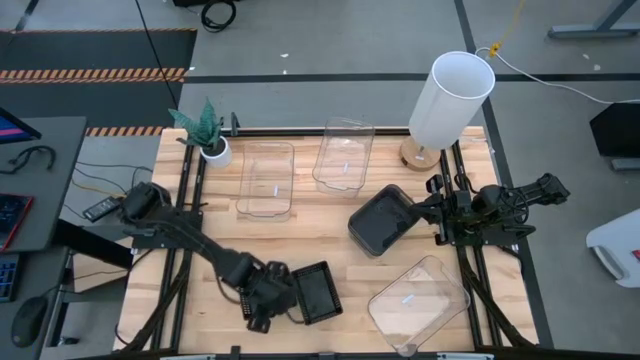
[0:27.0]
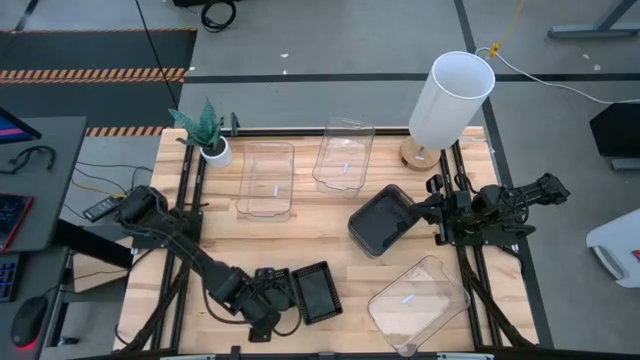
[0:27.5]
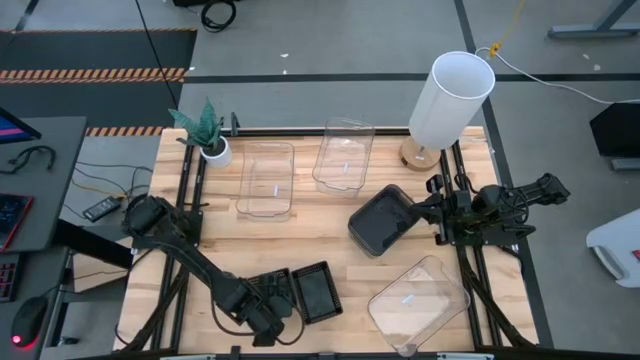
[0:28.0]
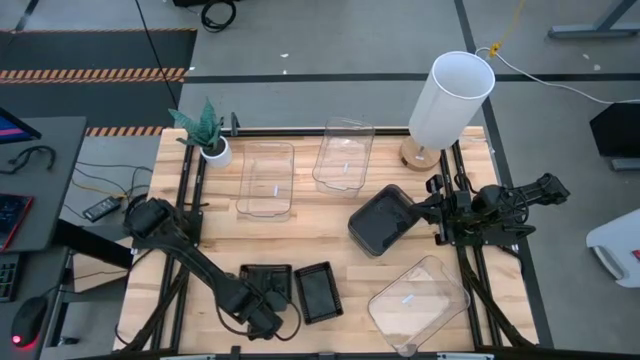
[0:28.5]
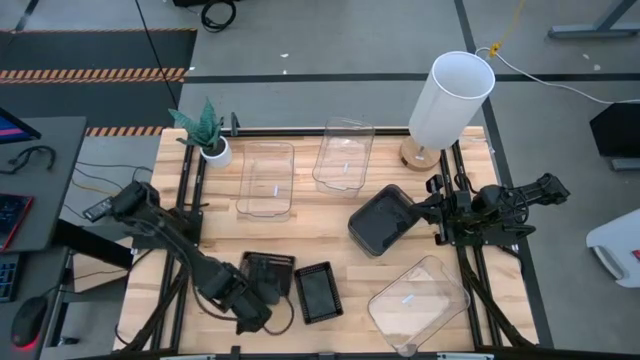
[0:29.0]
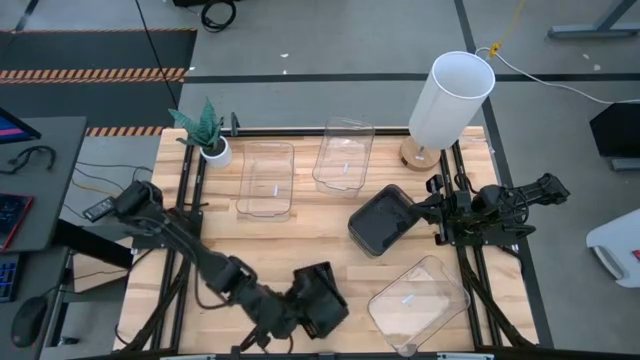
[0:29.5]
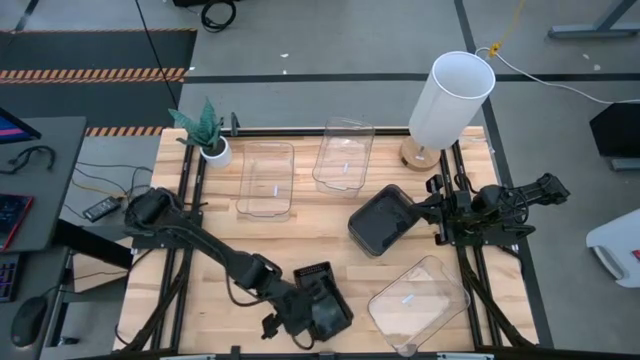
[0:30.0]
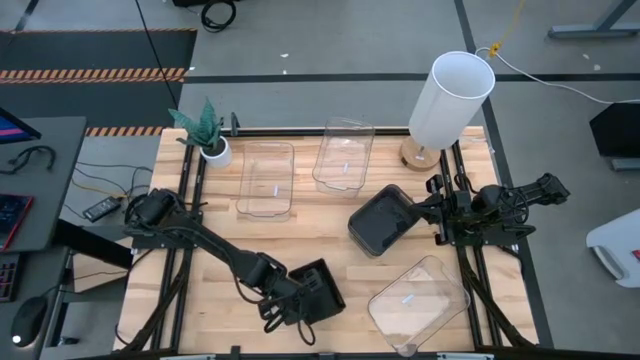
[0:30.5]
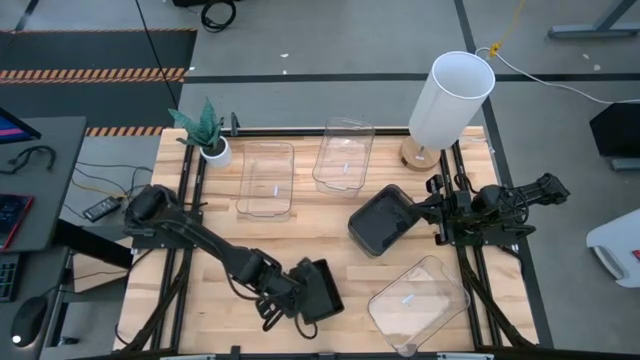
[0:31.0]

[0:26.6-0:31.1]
Stack the left black basket on the top of the right black basket

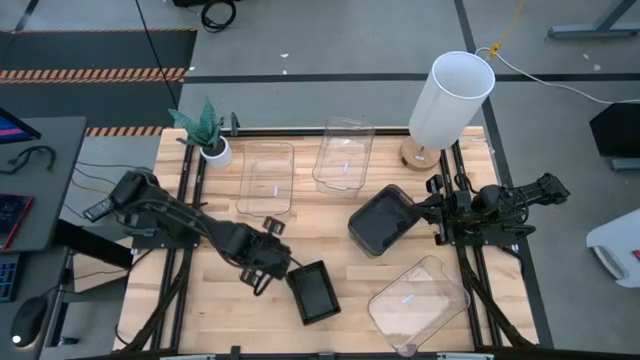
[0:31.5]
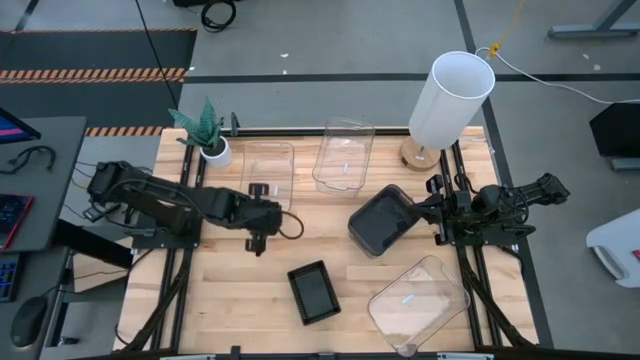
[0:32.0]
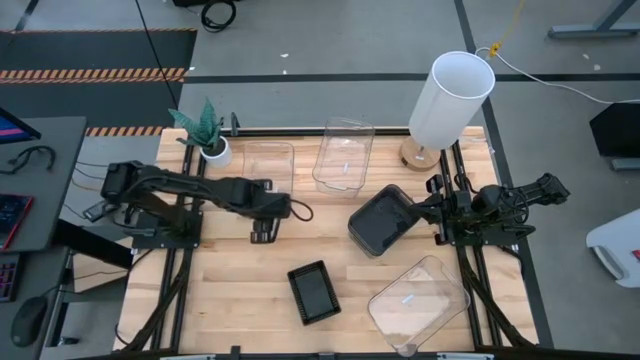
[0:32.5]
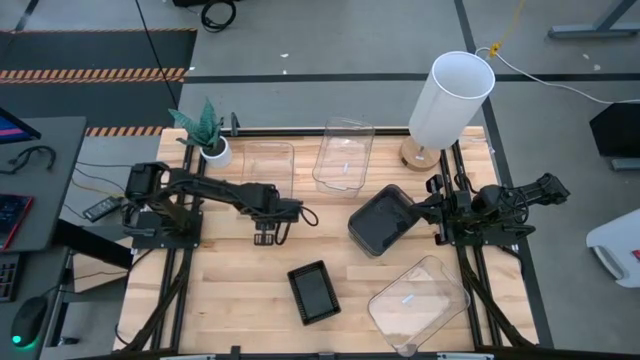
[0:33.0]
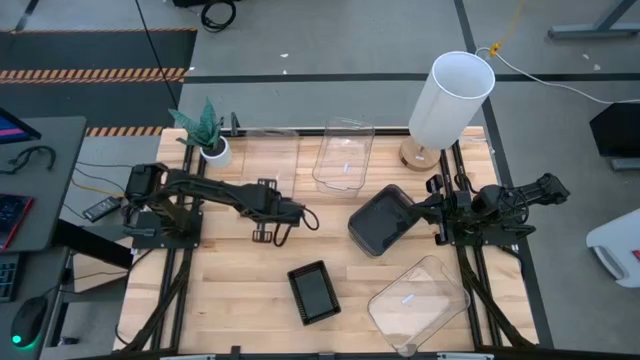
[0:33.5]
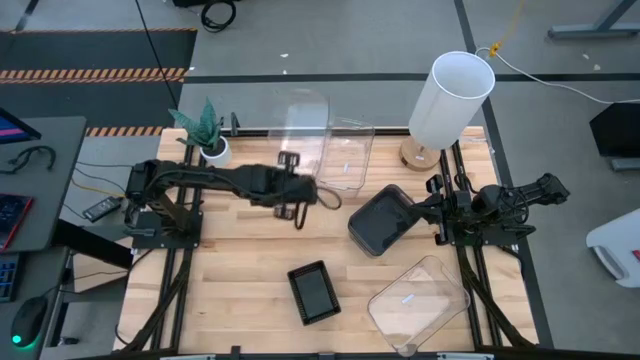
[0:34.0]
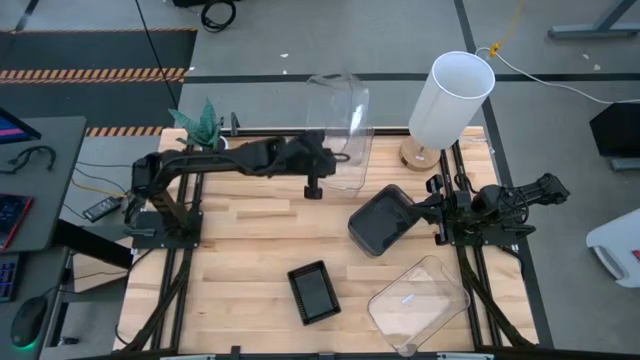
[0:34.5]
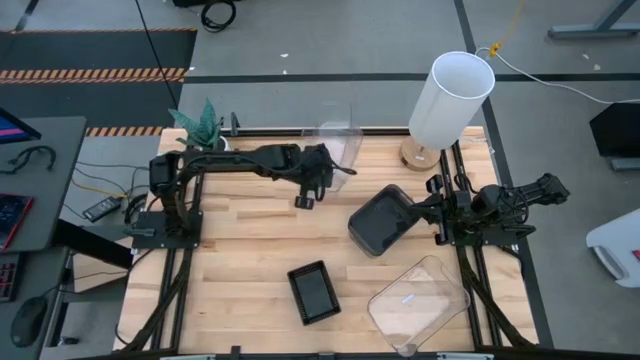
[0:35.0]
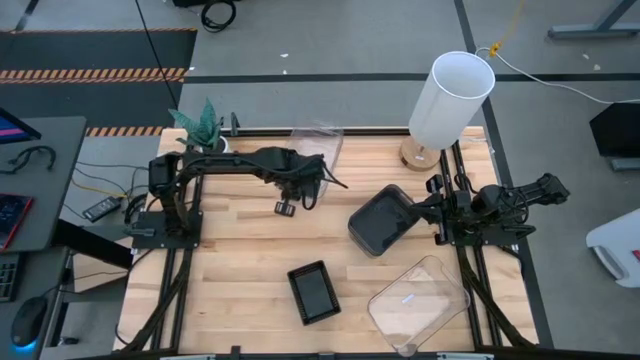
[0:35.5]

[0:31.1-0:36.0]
Stack the top left transparent bin on the top of the top right transparent bin

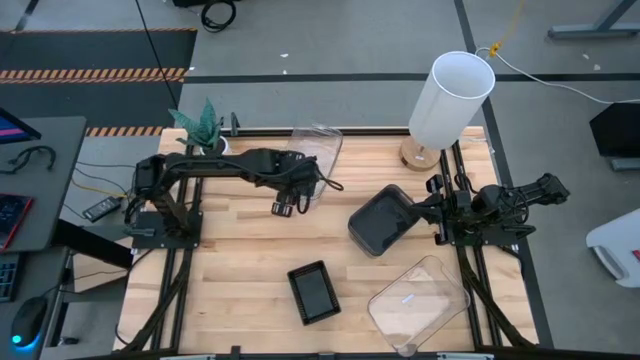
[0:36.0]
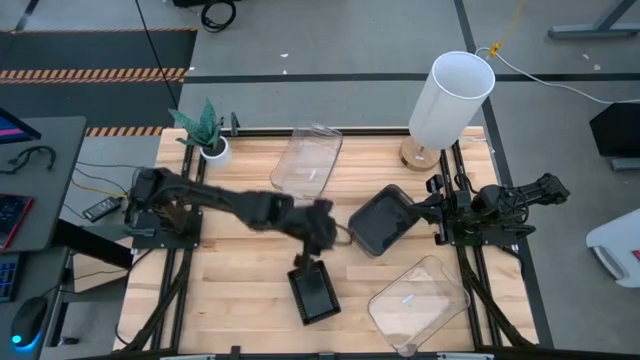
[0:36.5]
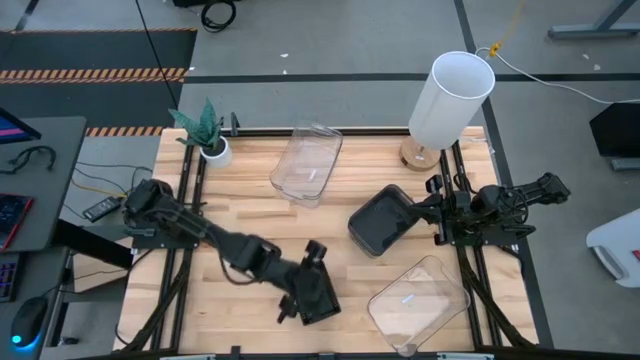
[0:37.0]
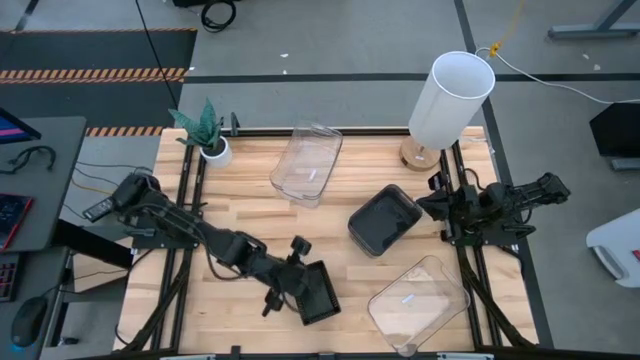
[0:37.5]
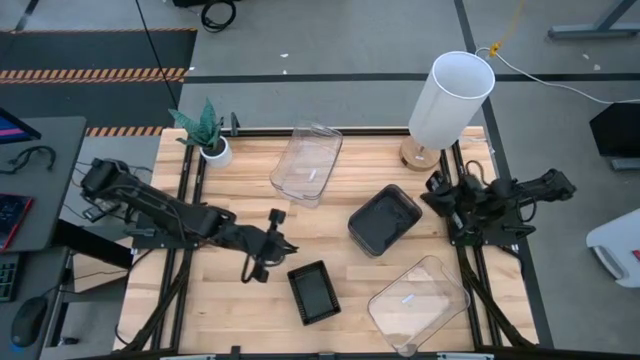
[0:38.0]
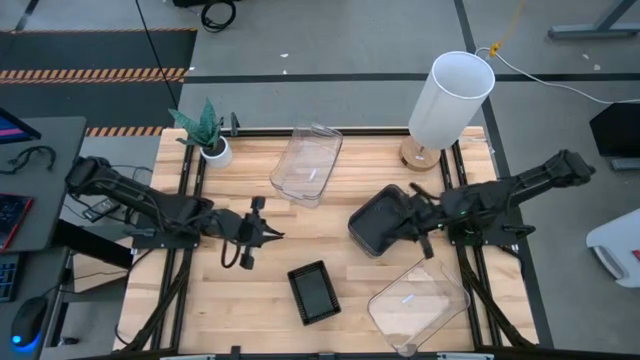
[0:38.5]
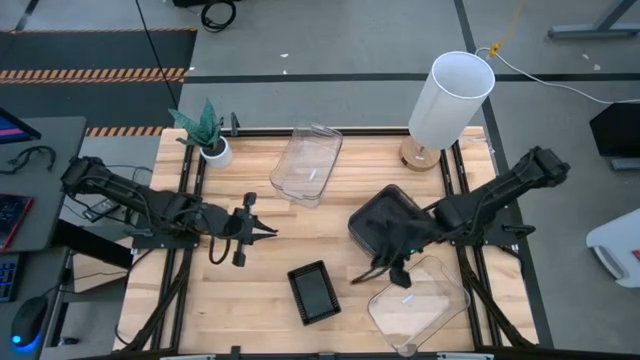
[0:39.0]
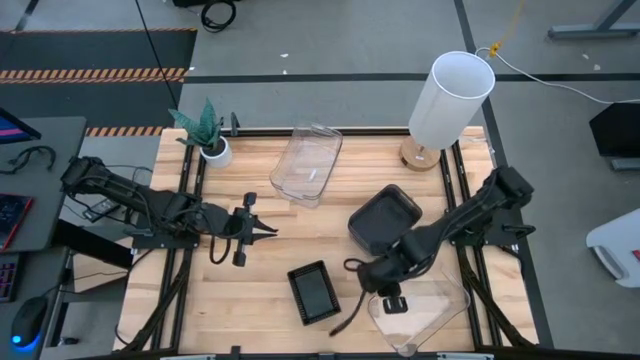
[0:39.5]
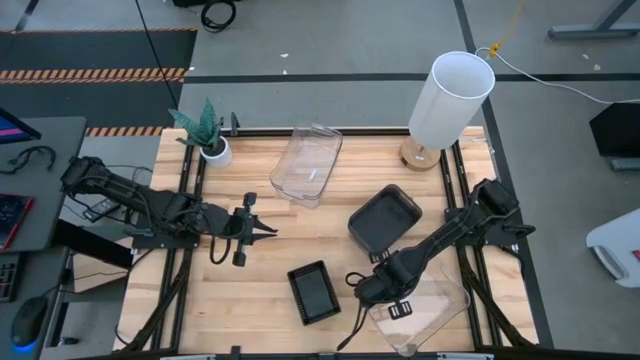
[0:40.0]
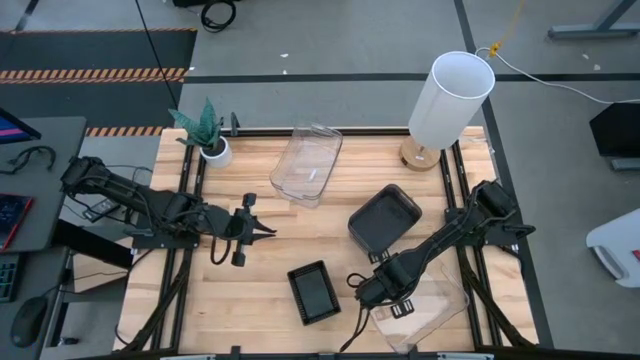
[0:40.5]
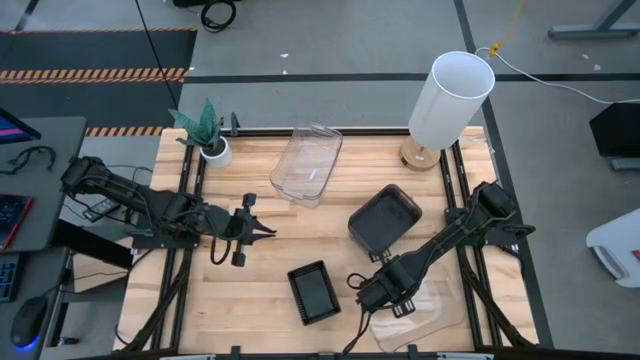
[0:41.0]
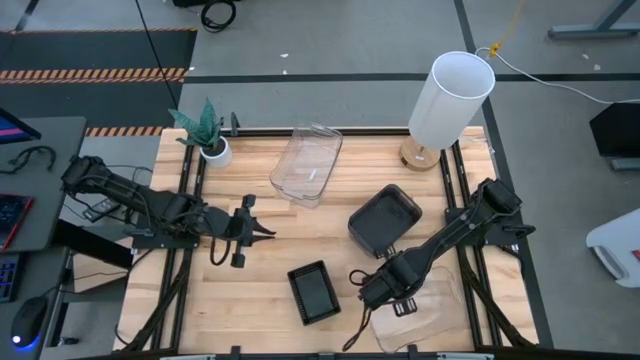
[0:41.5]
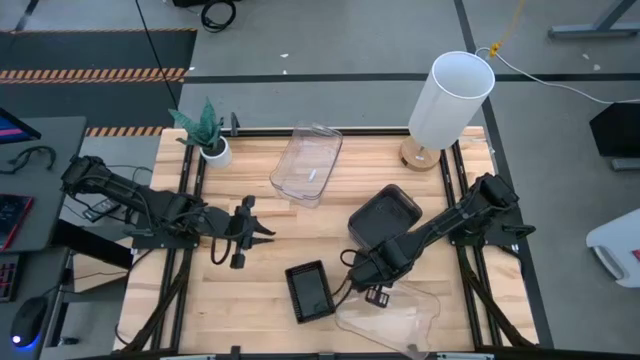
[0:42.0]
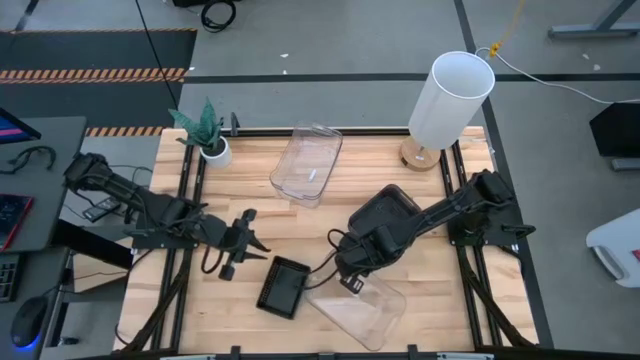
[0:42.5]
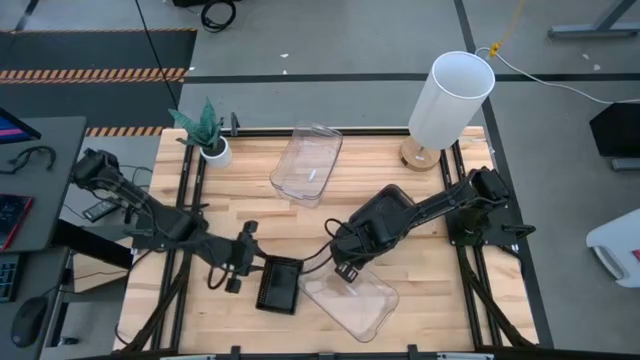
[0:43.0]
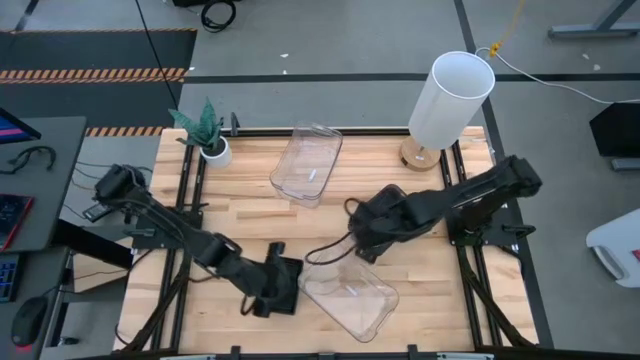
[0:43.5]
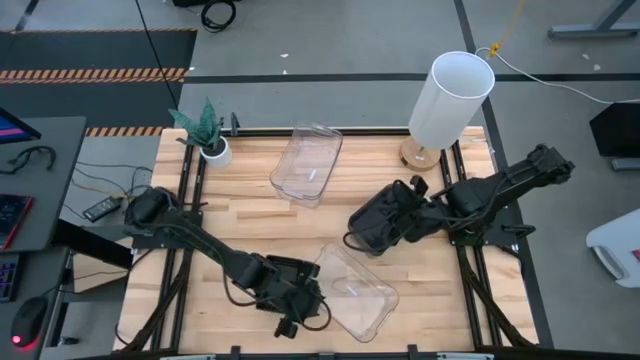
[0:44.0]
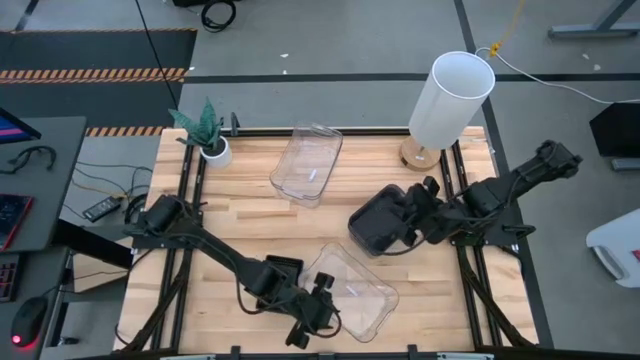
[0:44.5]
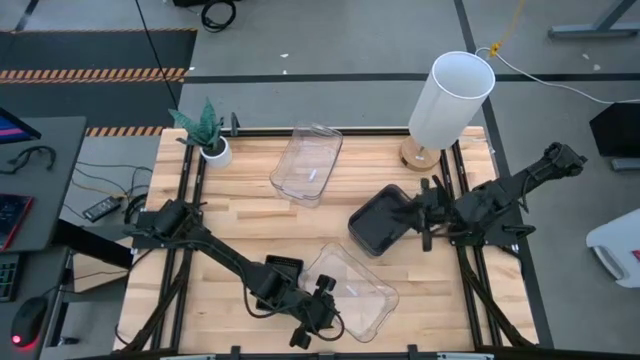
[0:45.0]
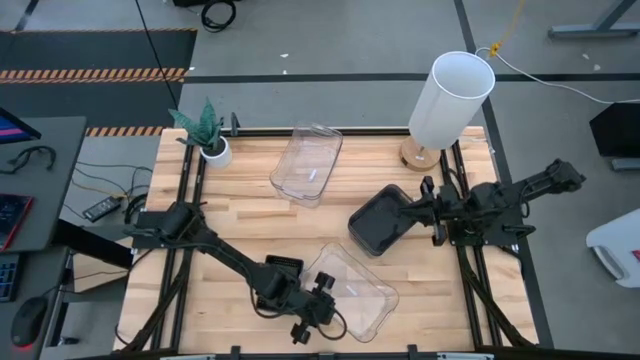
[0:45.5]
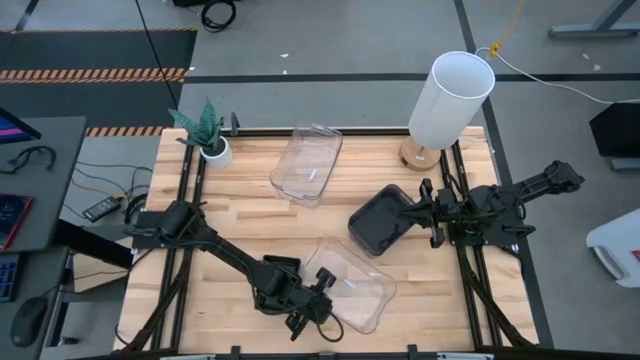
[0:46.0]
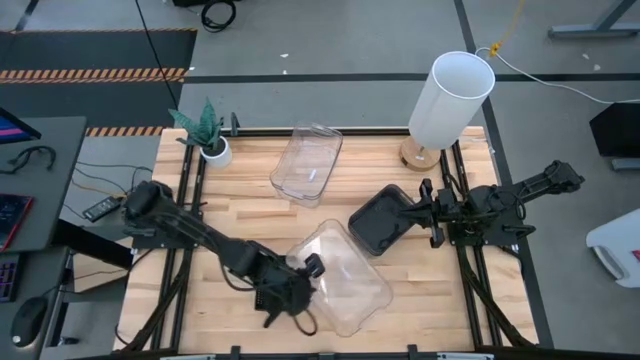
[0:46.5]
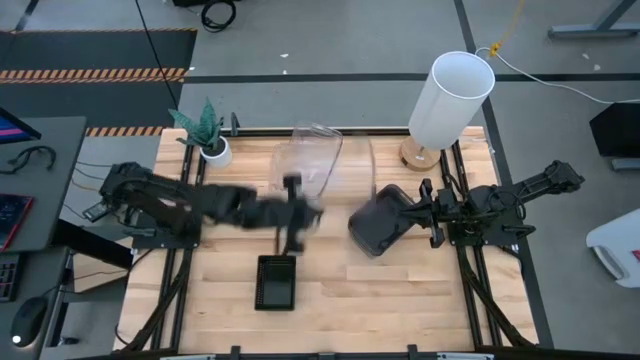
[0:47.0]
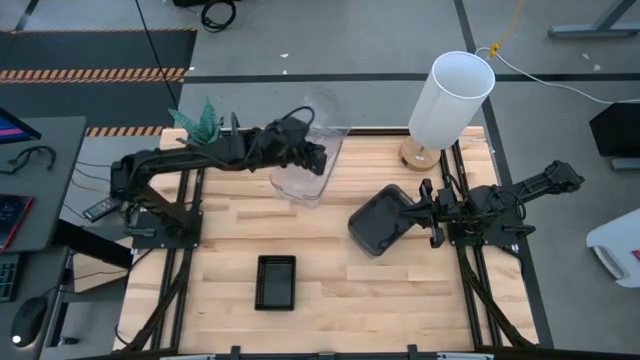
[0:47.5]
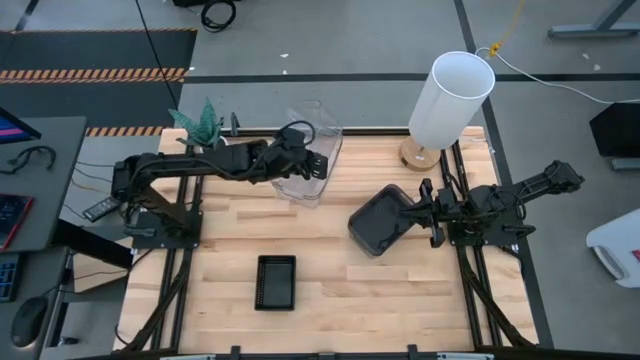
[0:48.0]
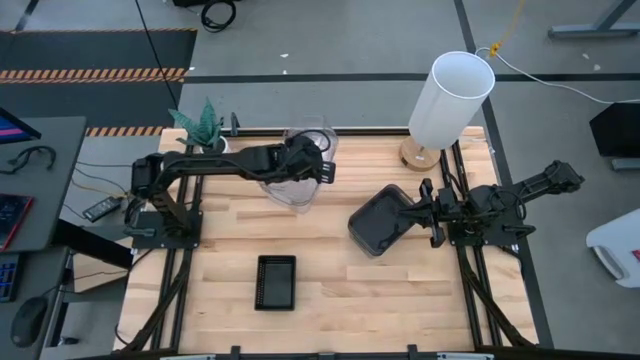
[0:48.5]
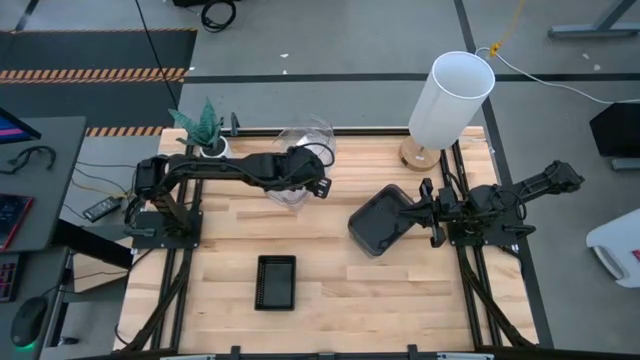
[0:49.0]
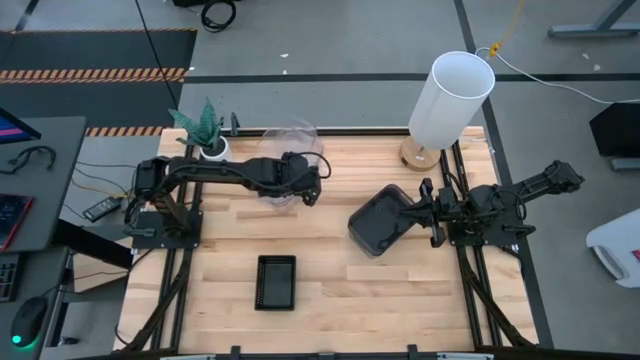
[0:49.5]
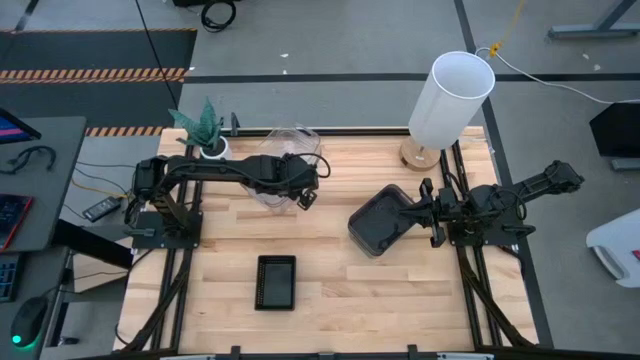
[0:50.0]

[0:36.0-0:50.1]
Stack the bottom transparent bin on the top of the top transparent bin
